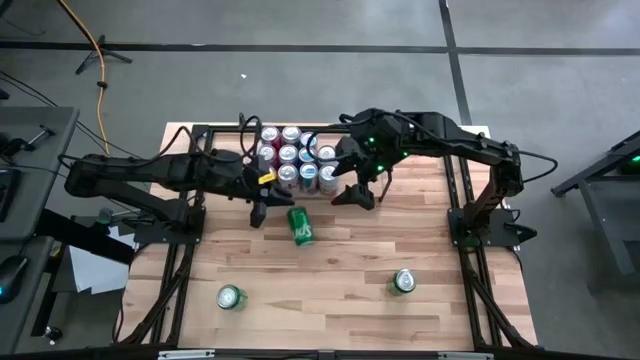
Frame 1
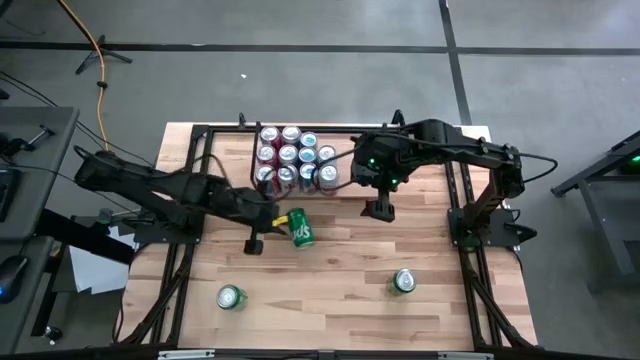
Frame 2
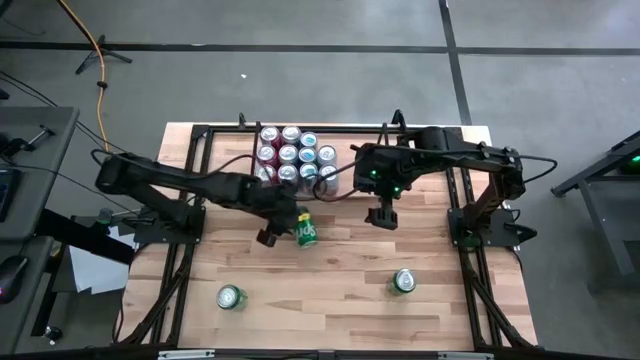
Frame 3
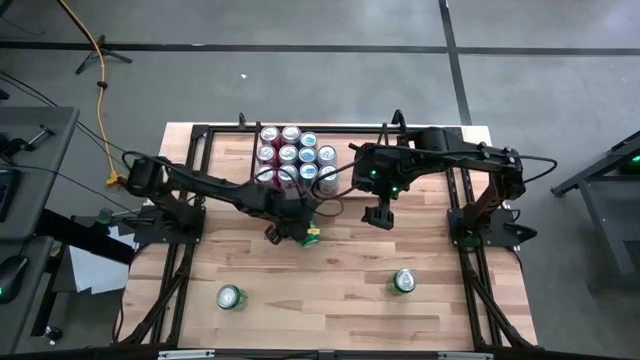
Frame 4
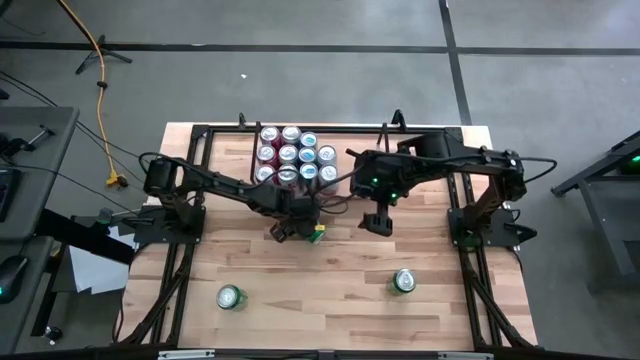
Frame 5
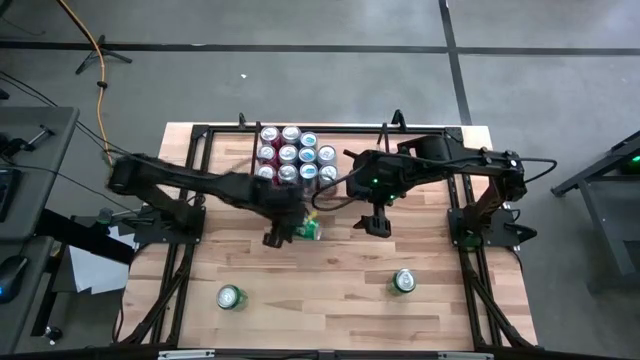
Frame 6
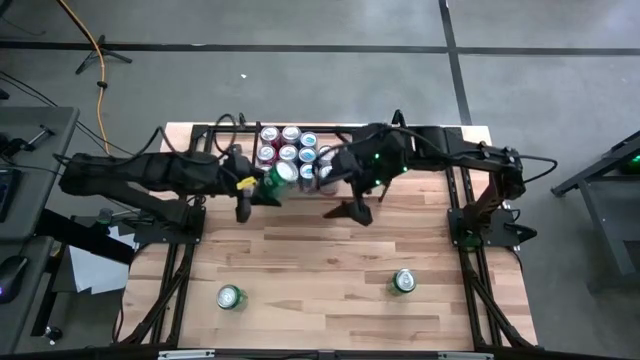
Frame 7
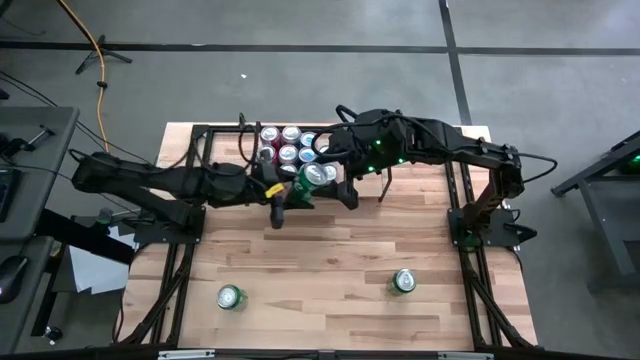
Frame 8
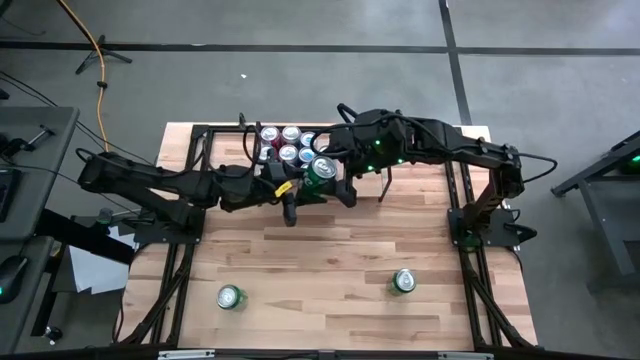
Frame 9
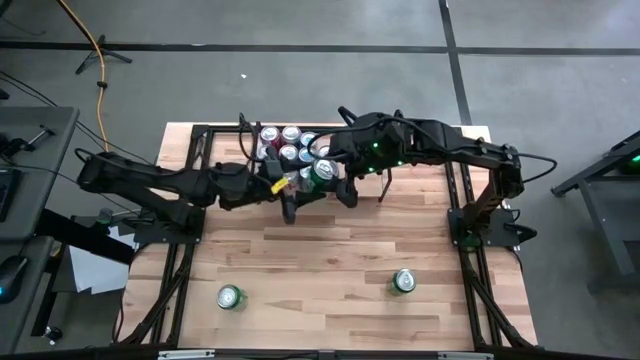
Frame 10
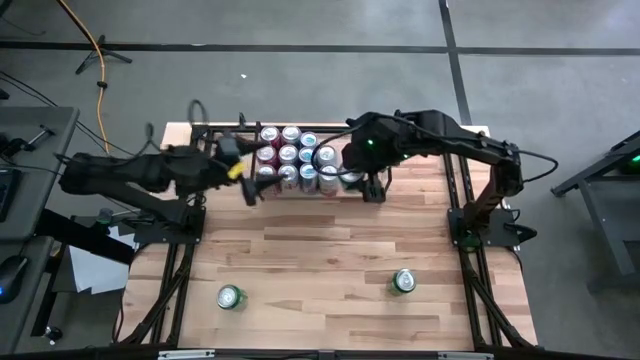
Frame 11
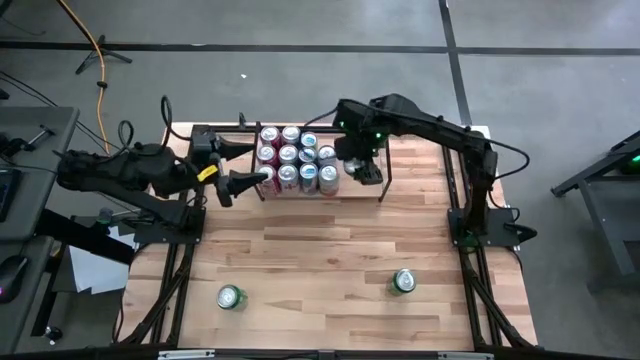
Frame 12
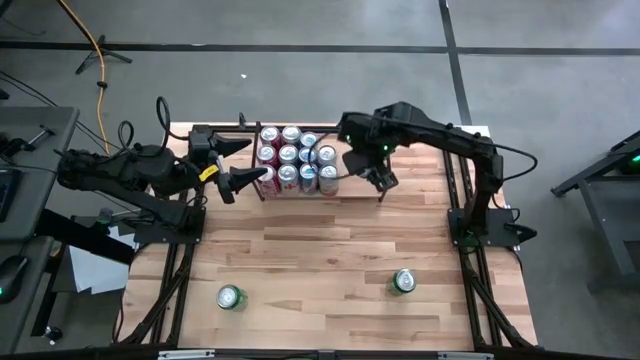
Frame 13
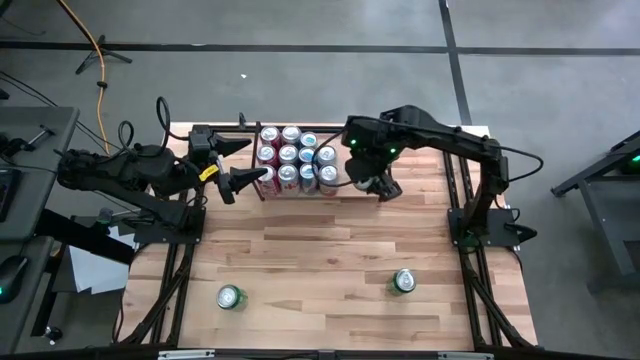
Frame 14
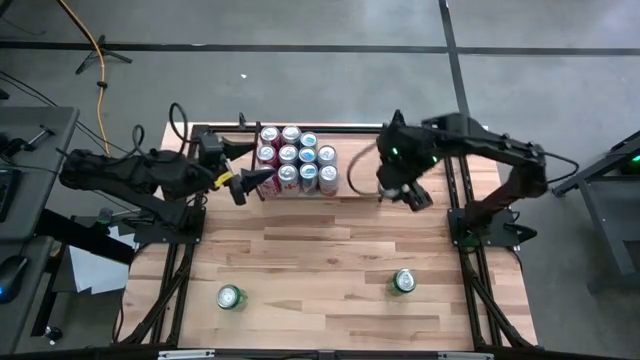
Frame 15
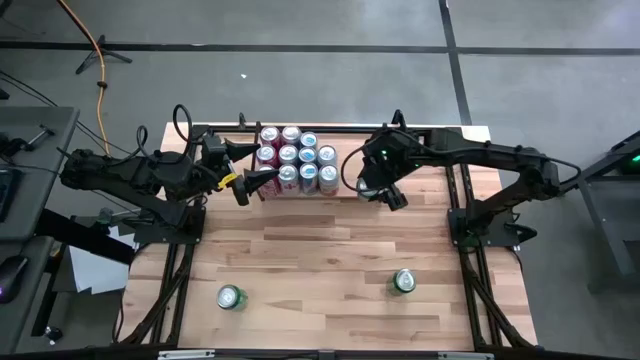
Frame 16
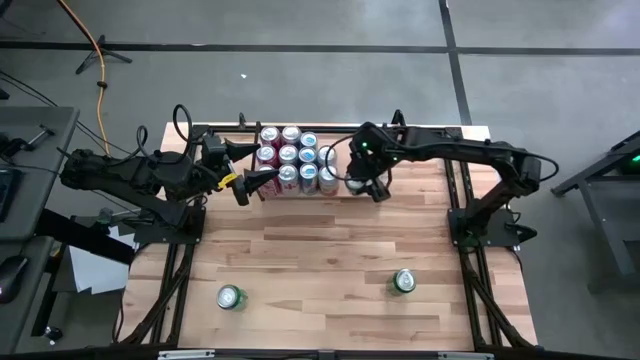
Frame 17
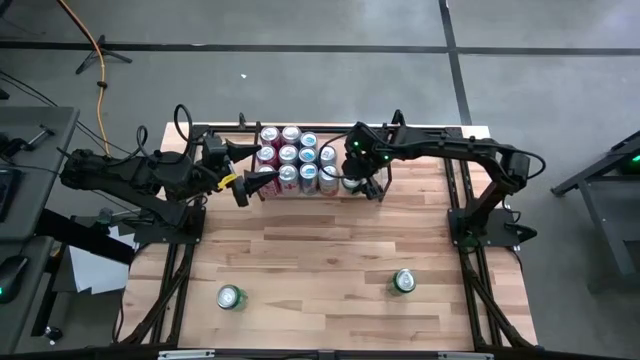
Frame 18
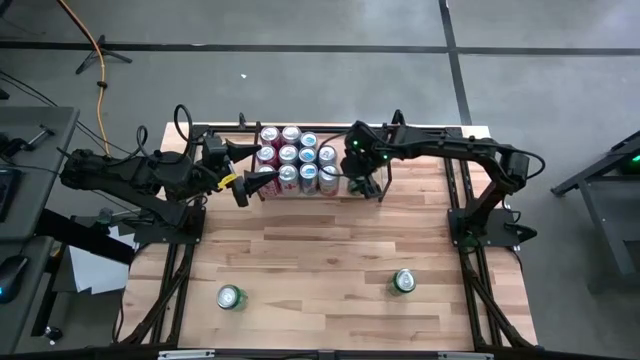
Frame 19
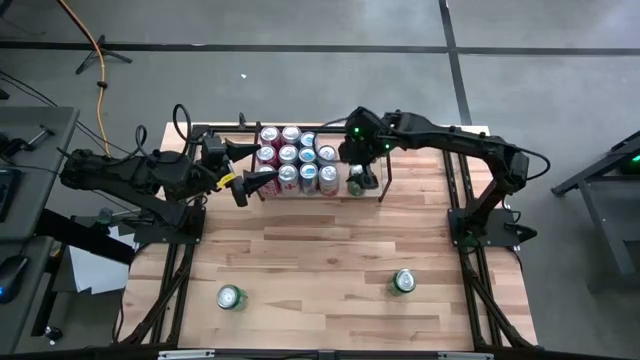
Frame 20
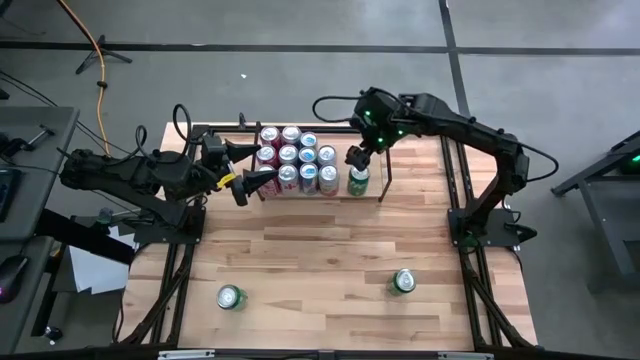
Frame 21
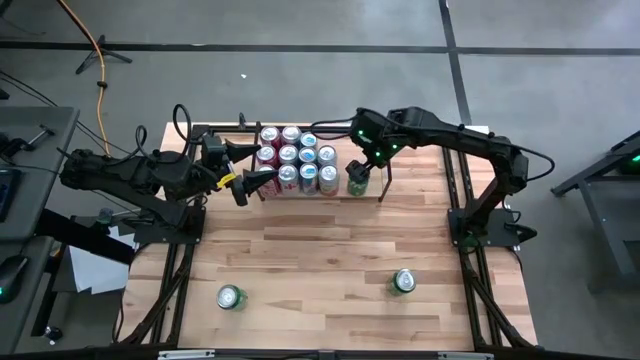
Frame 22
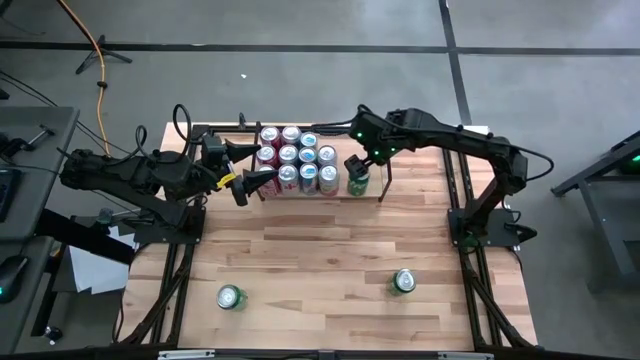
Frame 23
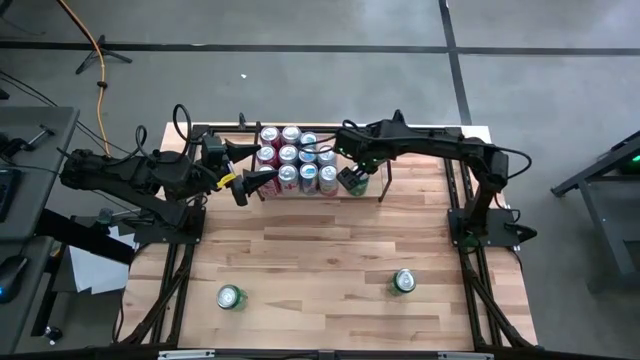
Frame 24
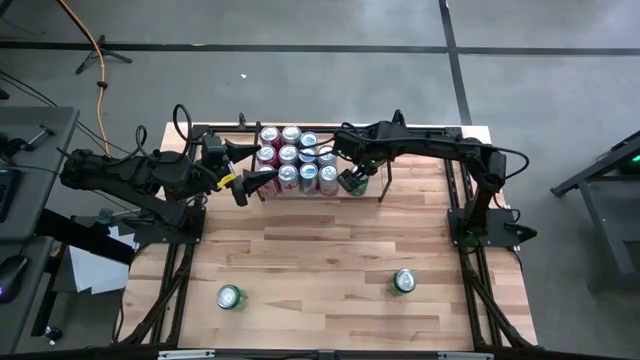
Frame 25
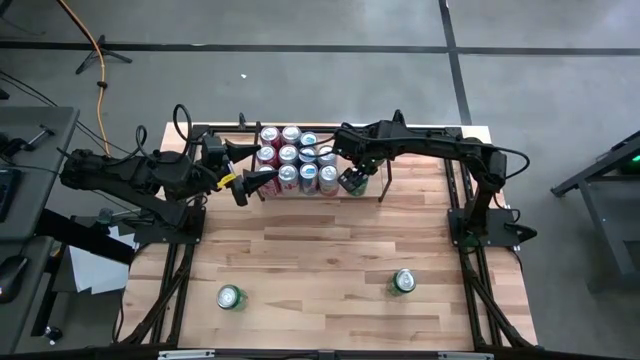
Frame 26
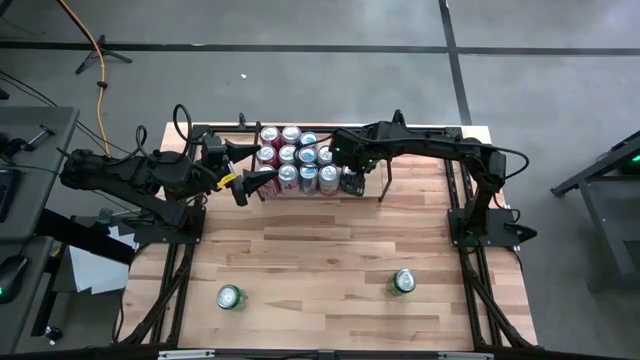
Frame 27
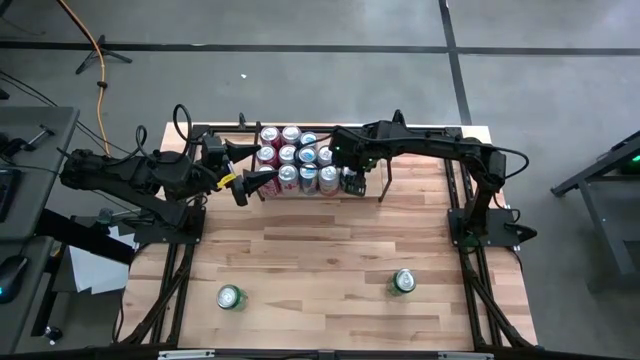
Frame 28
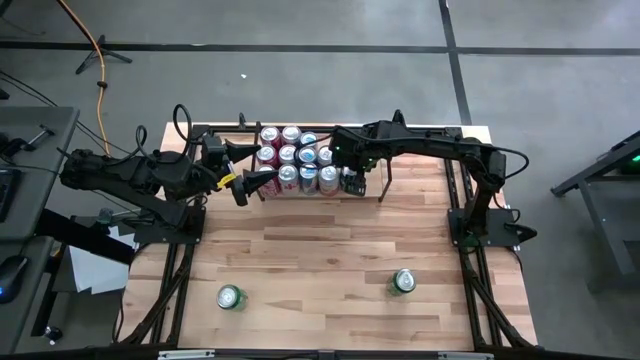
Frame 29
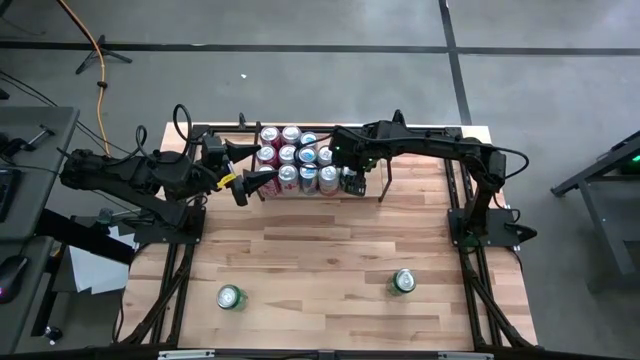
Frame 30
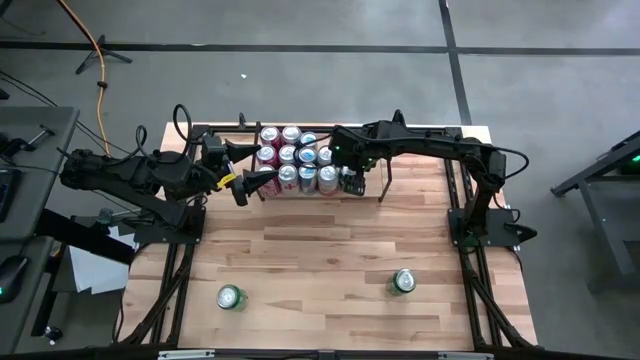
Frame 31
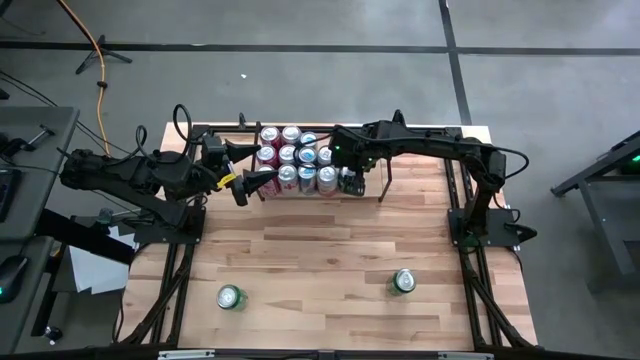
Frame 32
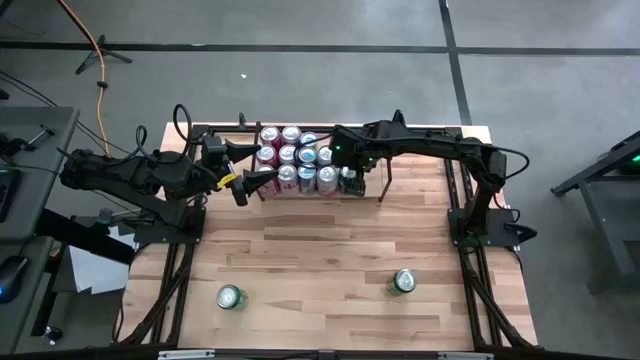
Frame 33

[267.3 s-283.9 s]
Task: Place canned beverage on shelf
Put the top green soda can on the shelf

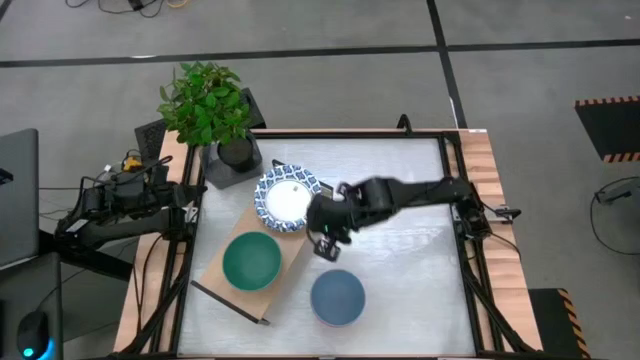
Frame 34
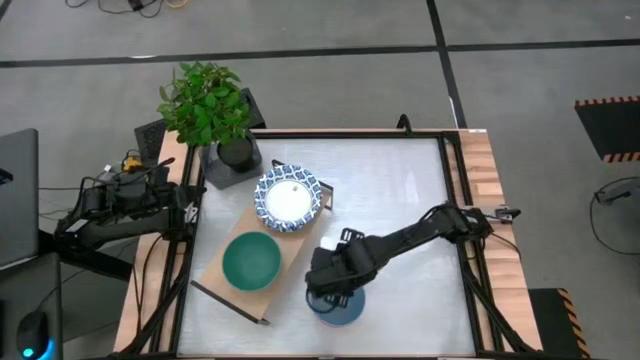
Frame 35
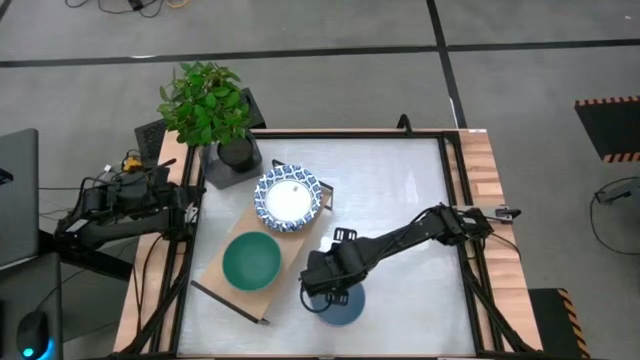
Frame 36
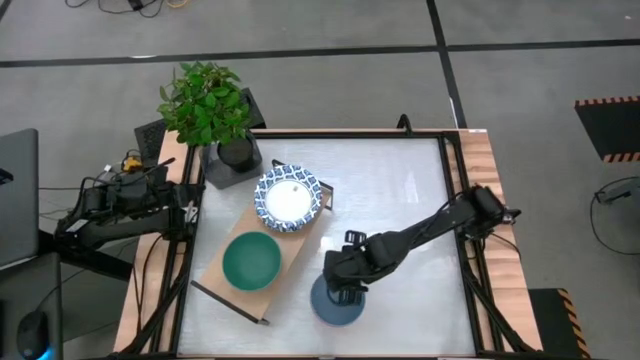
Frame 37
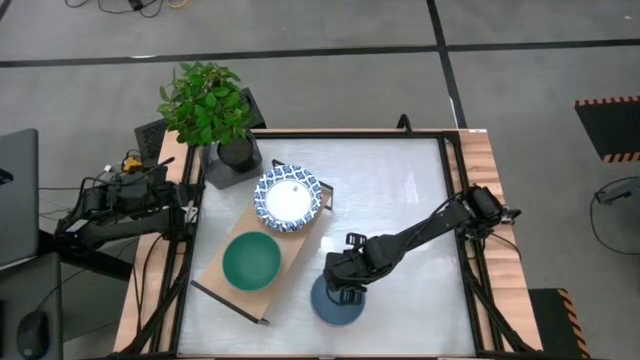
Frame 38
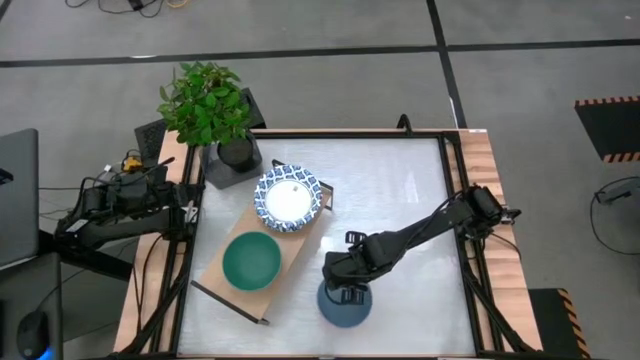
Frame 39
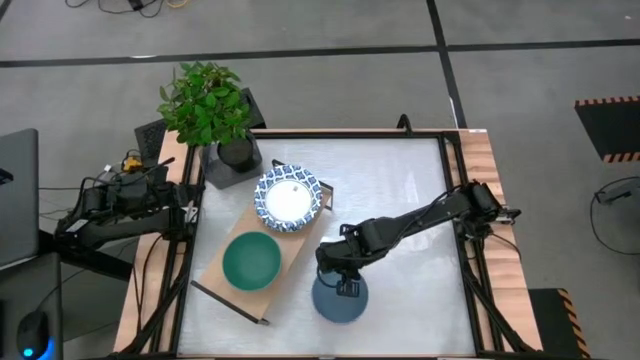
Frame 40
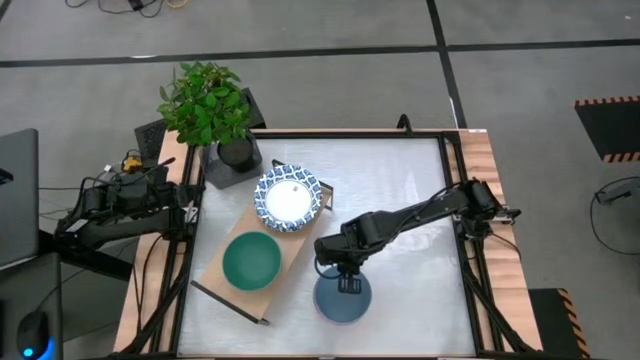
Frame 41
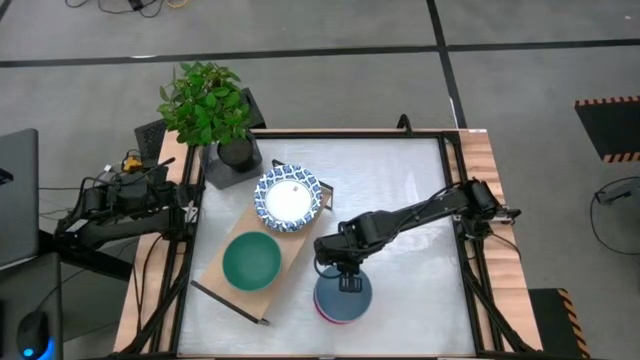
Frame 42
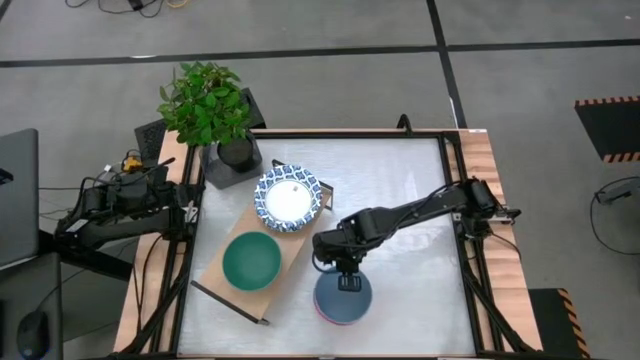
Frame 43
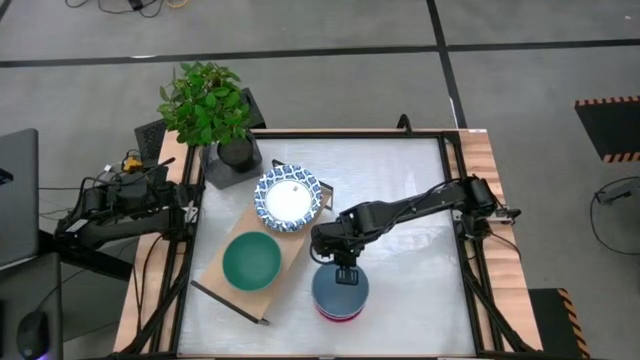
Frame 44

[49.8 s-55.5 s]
Task: Place and stack bowls onto a shelf
Stack the blue bowl on the green bowl on the shelf
